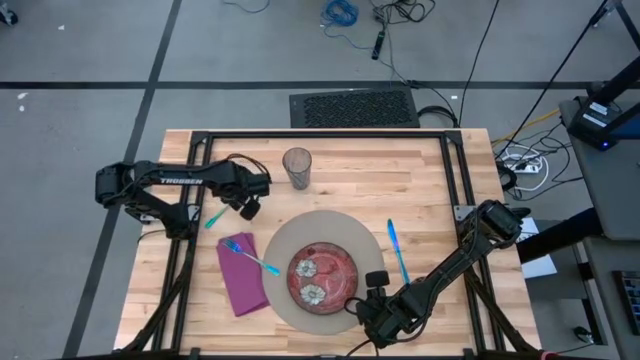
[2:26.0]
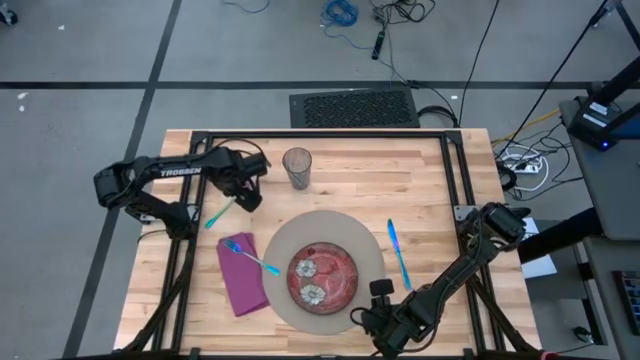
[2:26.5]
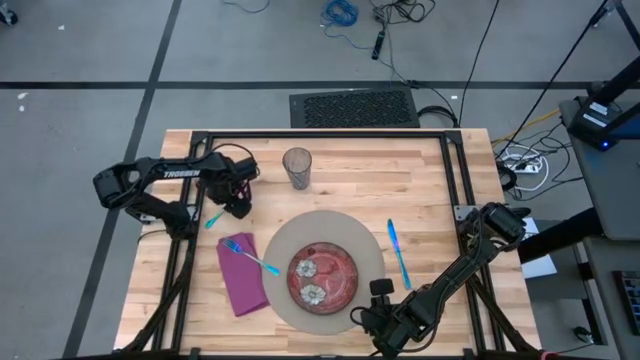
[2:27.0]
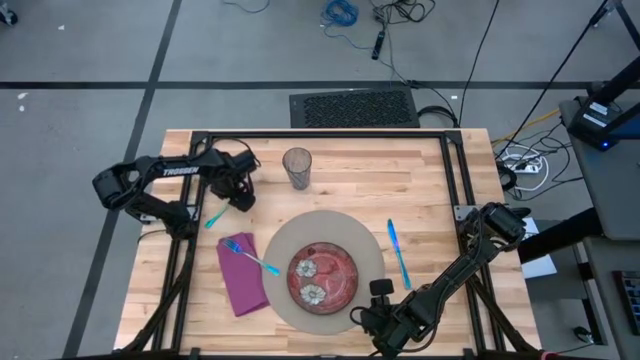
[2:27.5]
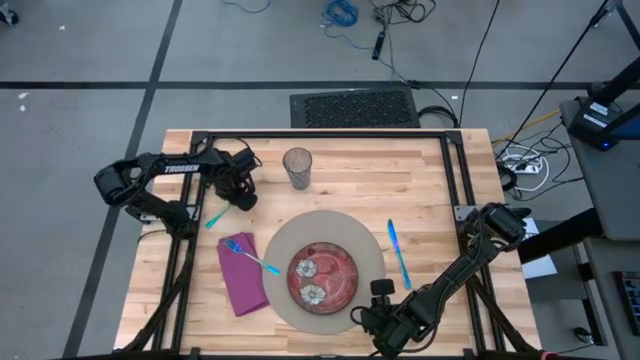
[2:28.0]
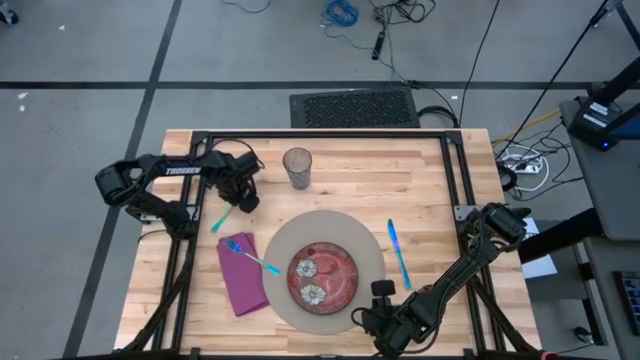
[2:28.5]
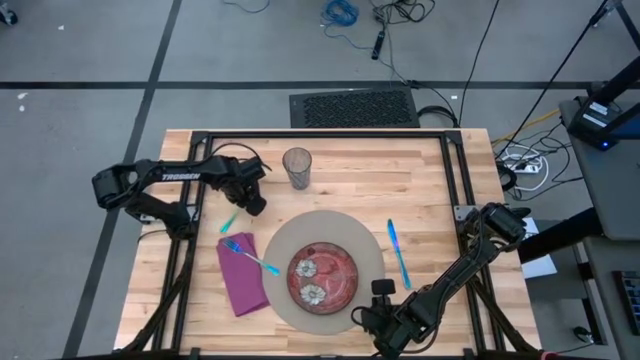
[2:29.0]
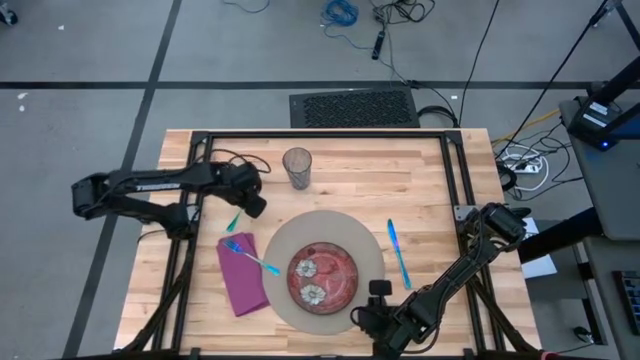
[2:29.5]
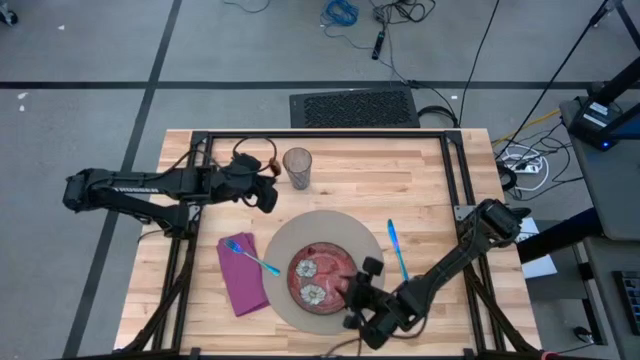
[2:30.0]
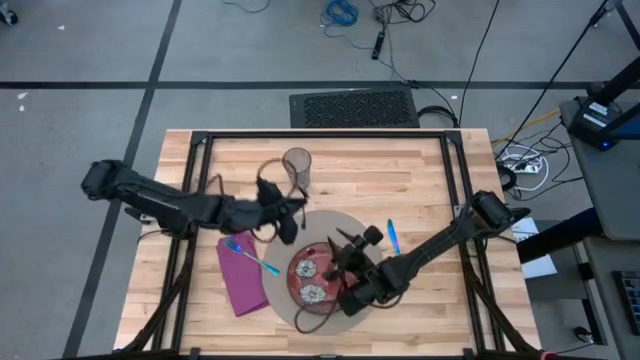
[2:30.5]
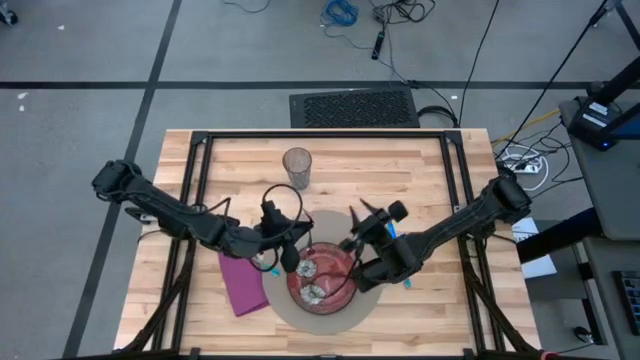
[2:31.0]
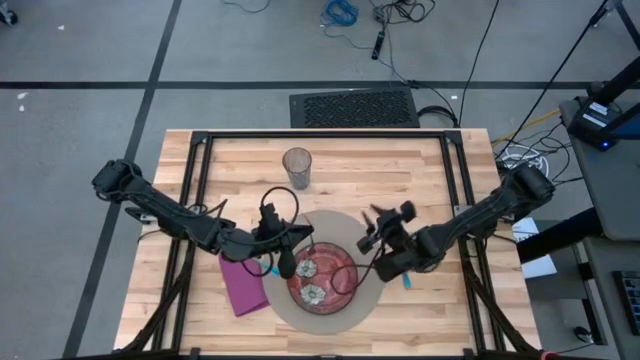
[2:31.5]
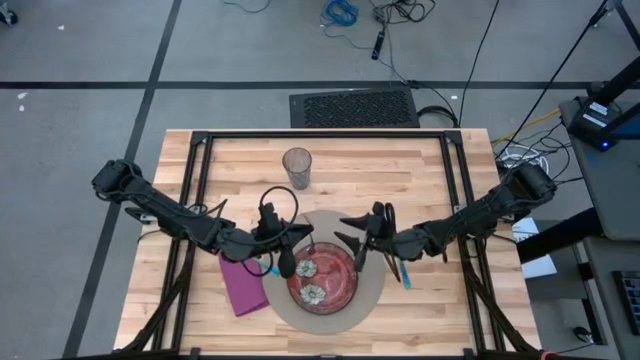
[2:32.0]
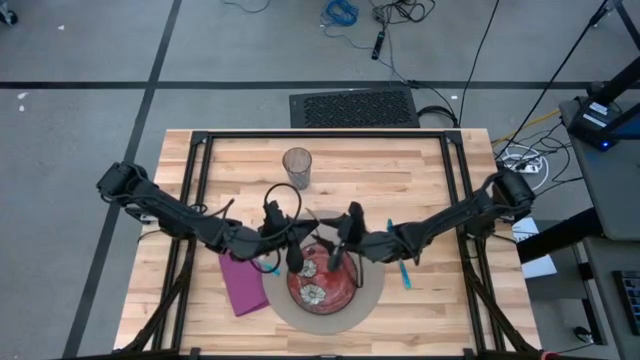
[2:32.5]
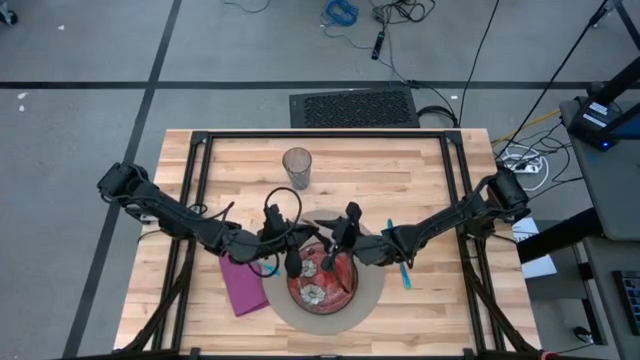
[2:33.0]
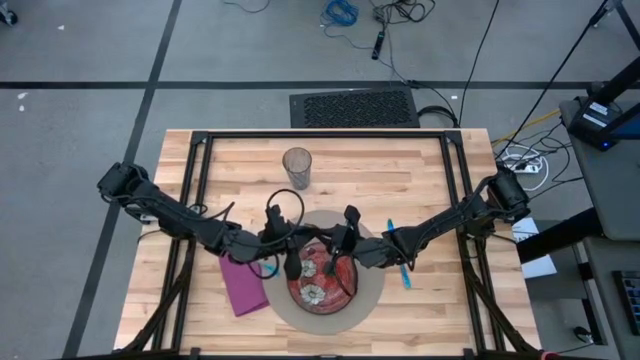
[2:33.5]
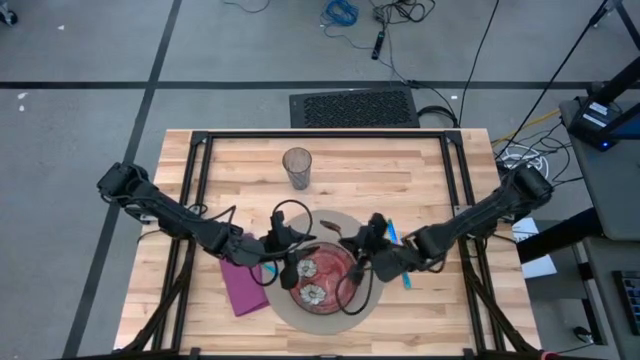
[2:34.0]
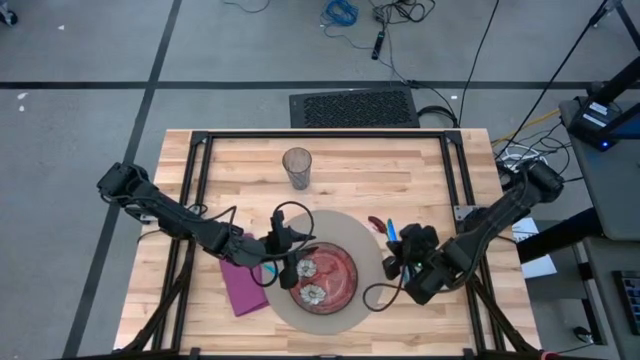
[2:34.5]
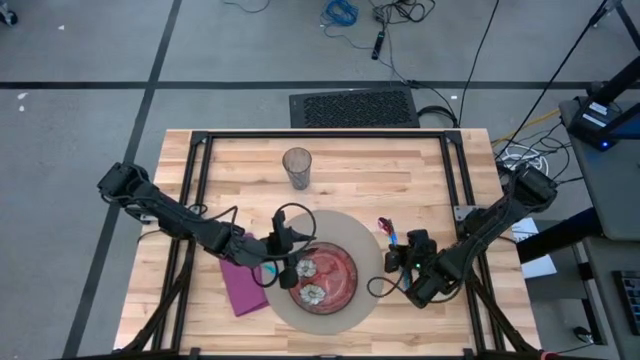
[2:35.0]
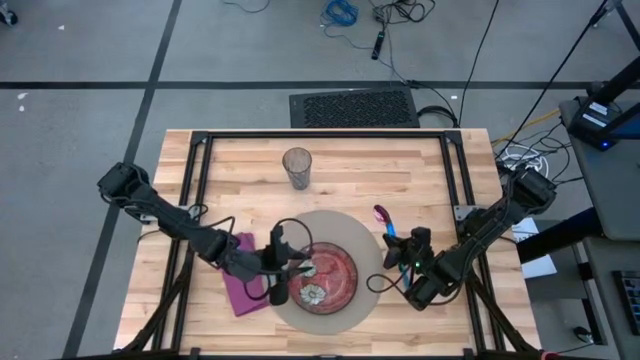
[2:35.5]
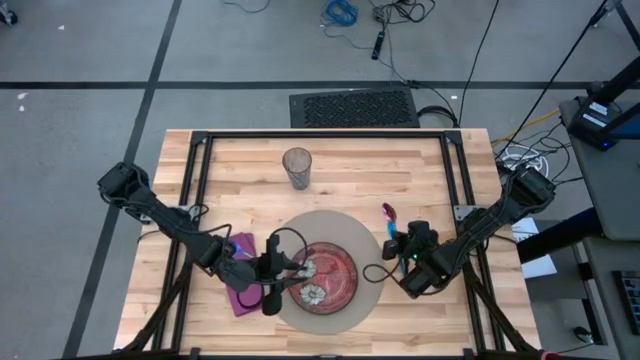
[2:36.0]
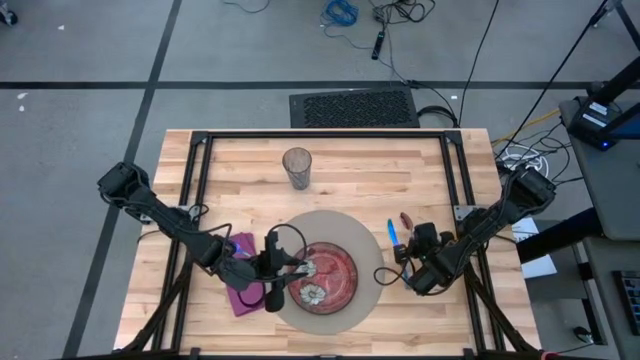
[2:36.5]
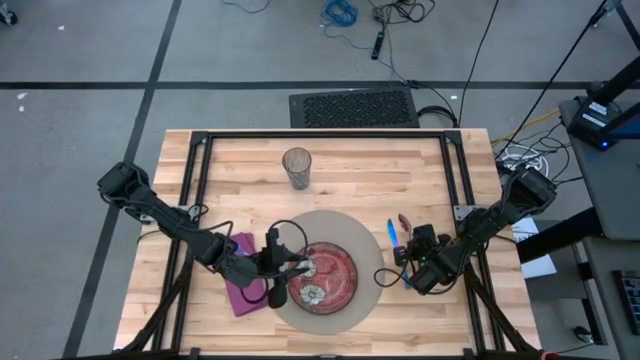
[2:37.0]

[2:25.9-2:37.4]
Task: Set table place
Put the pink spoon on the right side of the blue table knife

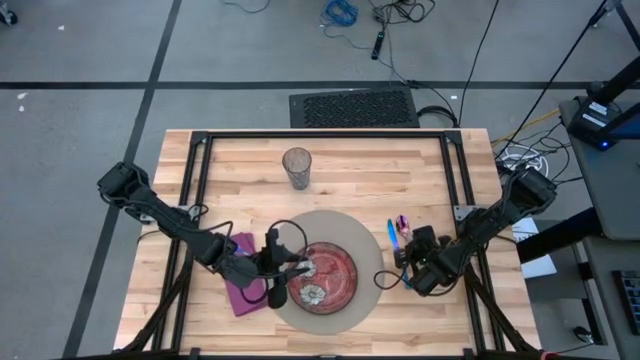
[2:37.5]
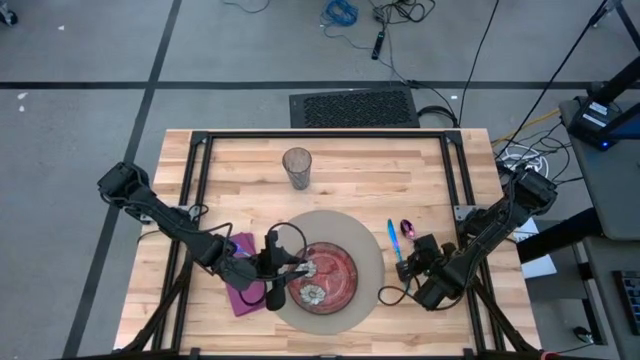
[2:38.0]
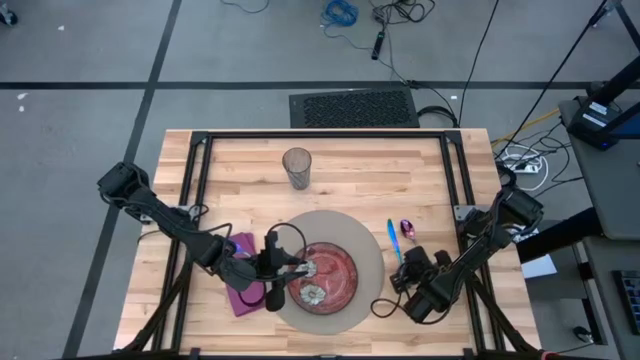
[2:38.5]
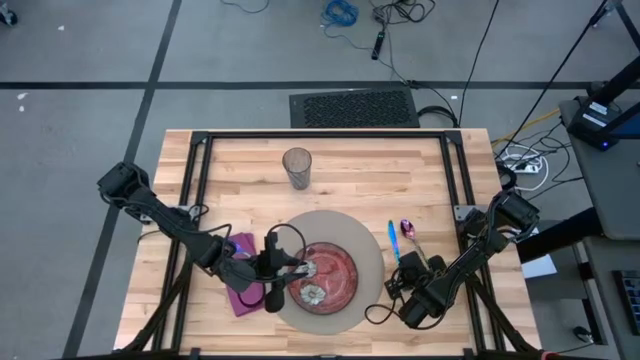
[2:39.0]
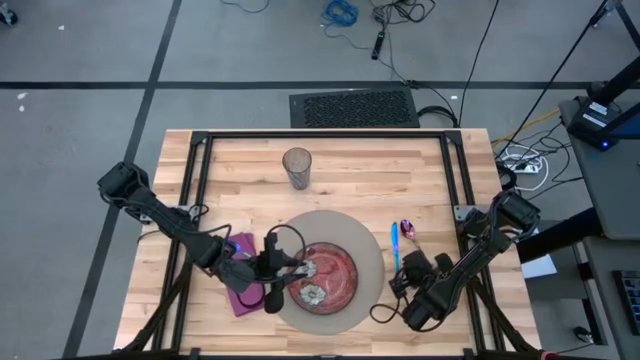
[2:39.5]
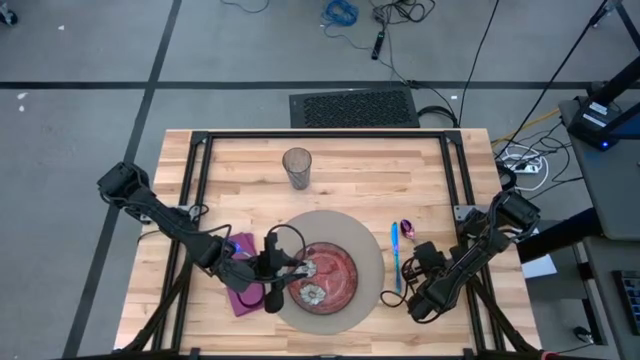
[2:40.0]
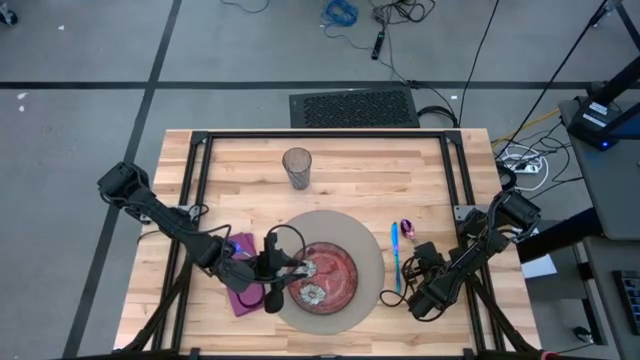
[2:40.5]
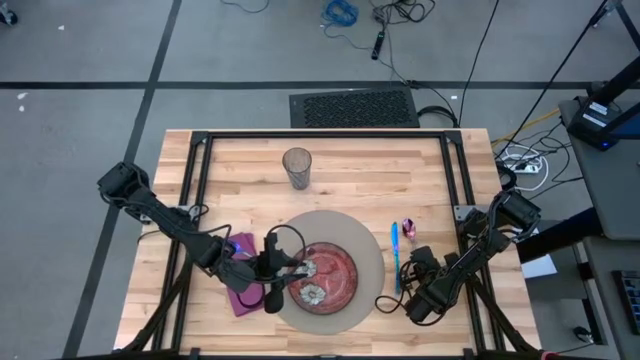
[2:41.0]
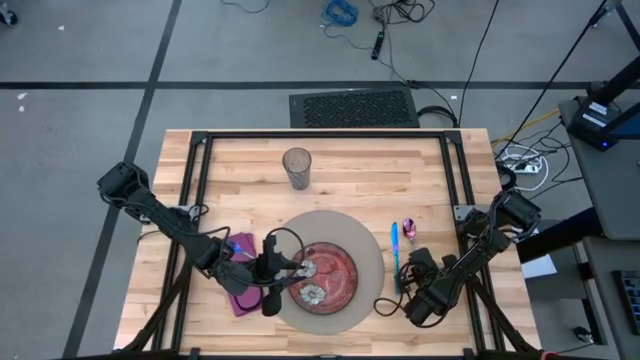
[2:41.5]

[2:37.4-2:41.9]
Adjust the blue table knife and pink spoon

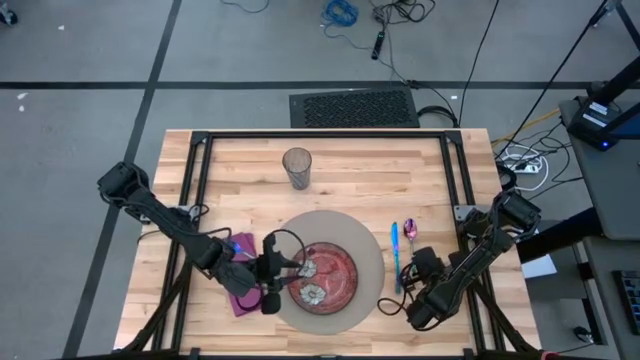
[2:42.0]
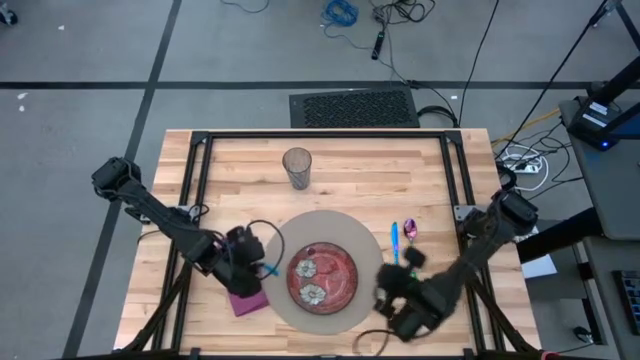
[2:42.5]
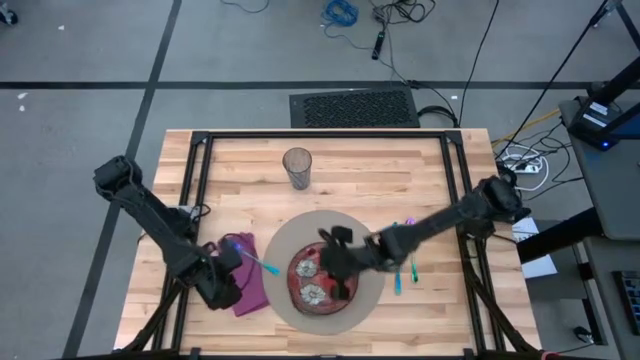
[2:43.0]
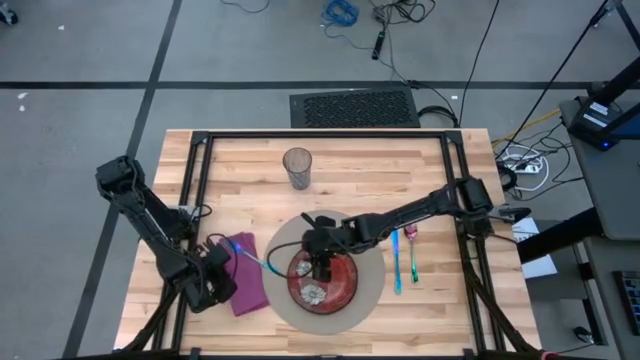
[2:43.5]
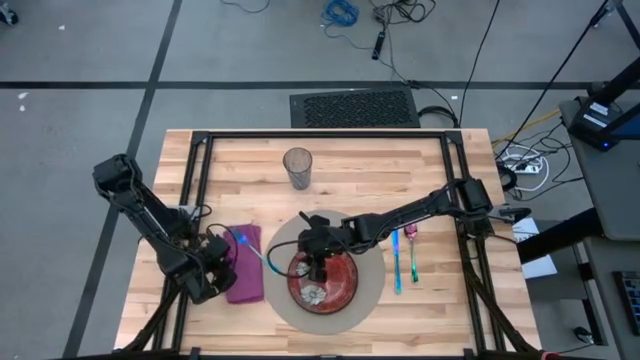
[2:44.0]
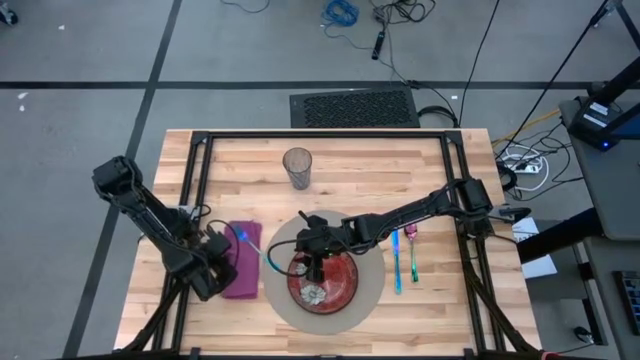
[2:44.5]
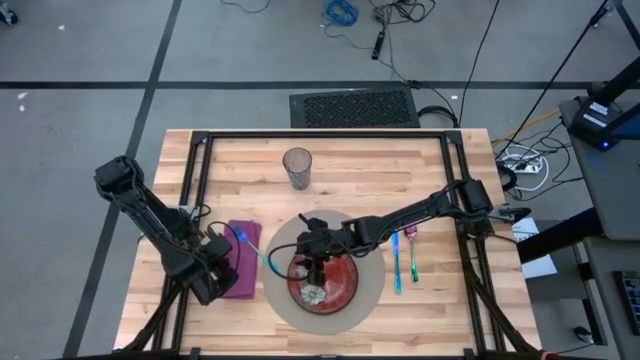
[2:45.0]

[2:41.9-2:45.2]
Adjust the pink table napkin

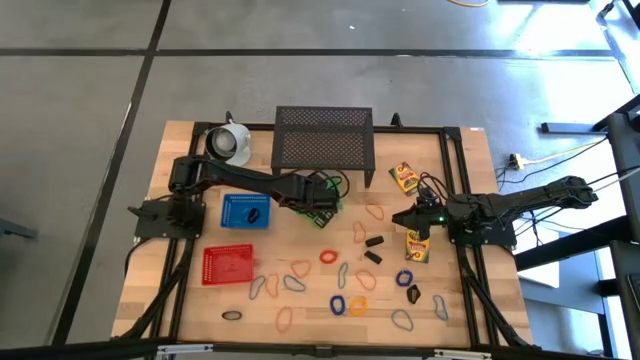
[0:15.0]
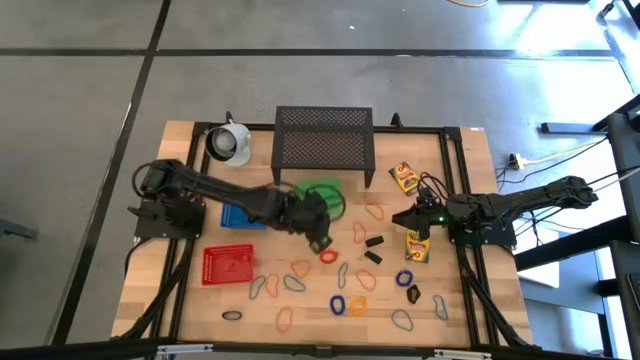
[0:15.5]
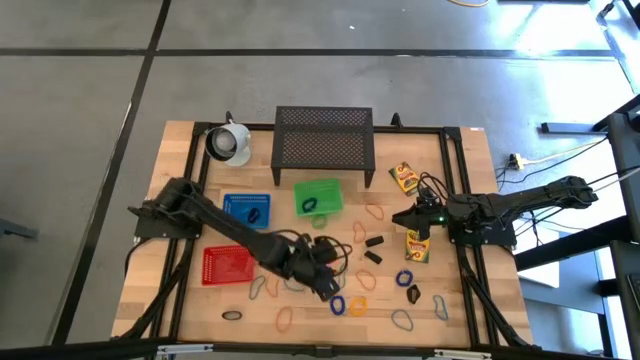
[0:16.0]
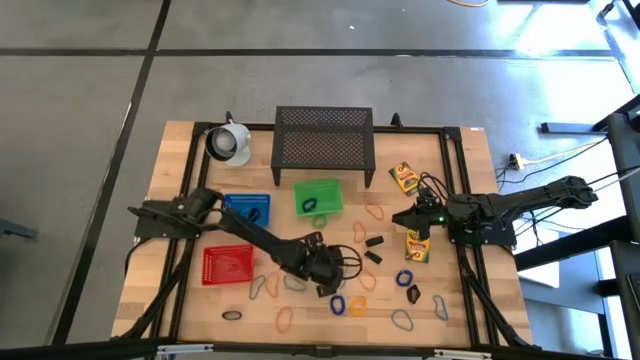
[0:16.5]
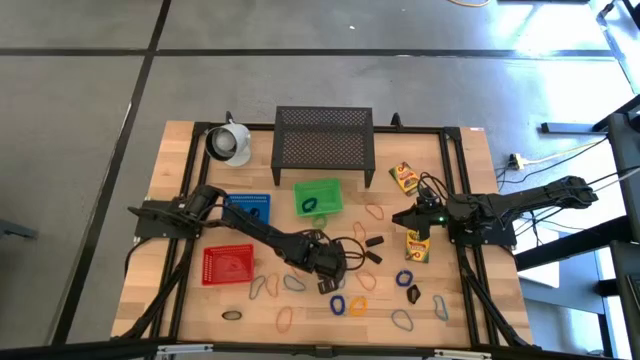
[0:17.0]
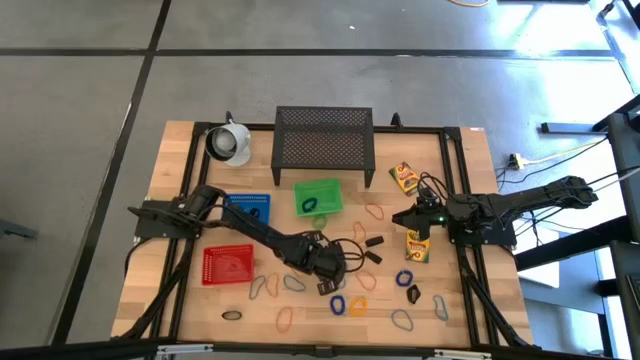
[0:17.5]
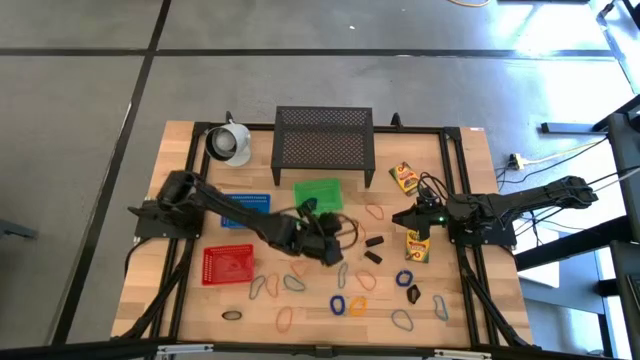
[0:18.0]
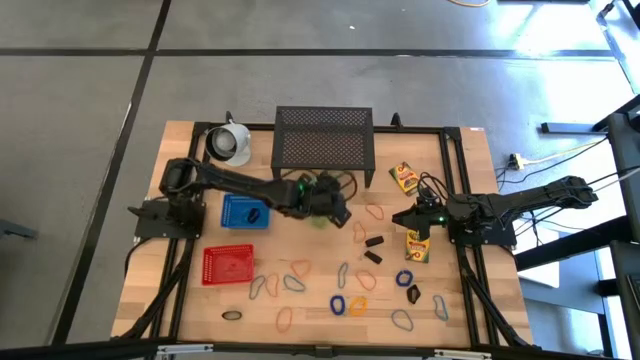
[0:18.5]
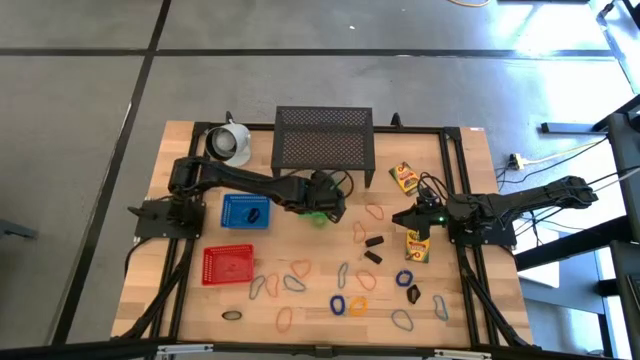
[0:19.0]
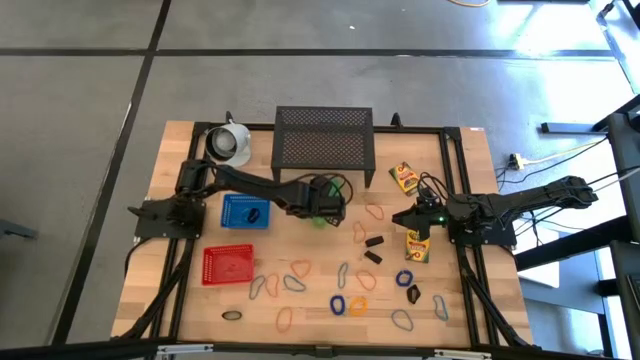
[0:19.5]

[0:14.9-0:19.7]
Task: Pick & Place Office Desk Supplies
Put the orange spring keychain into the green bin
